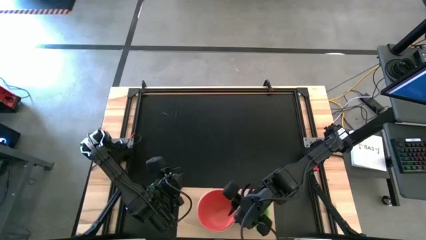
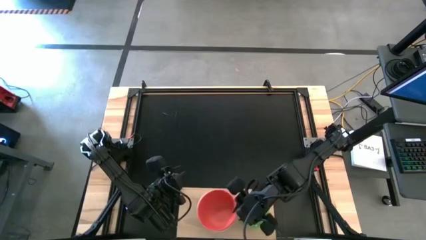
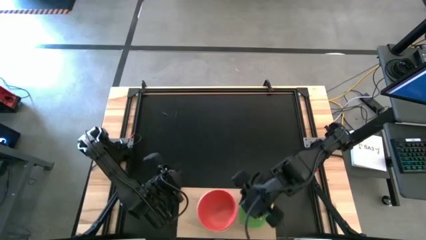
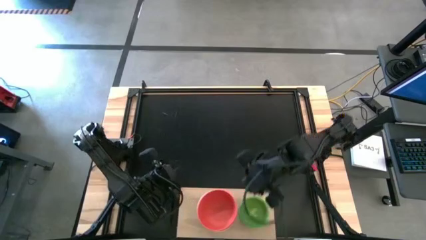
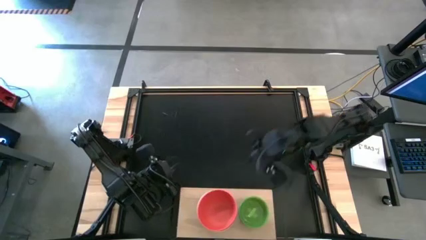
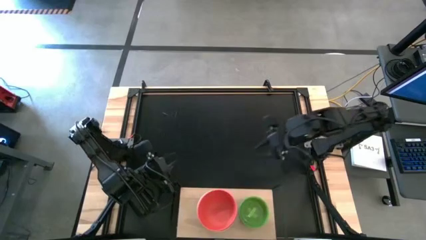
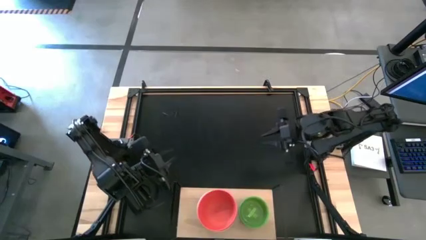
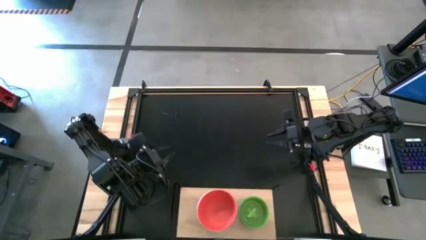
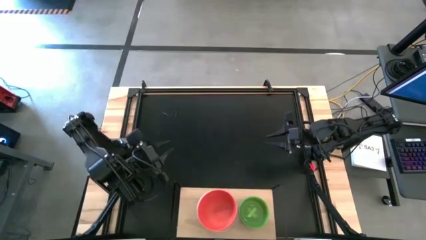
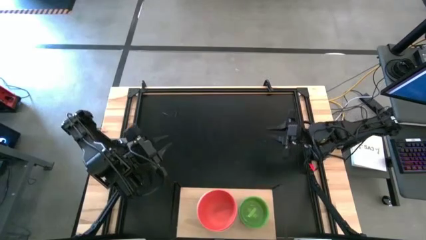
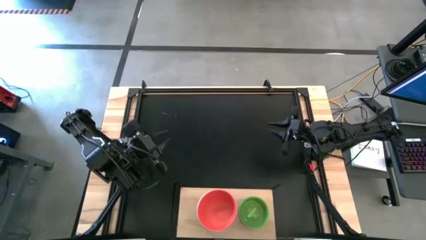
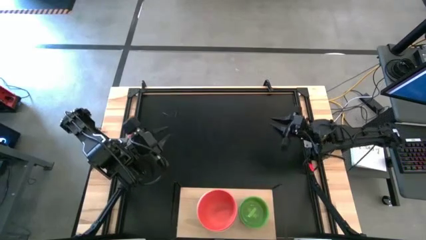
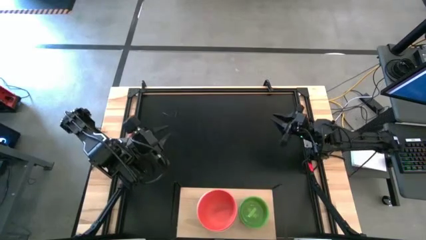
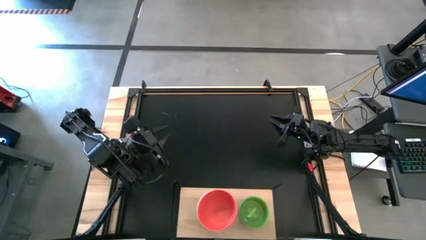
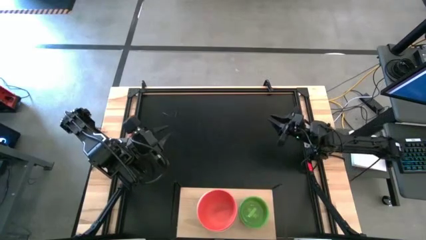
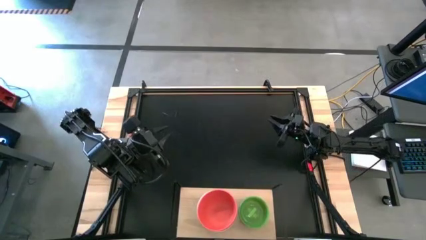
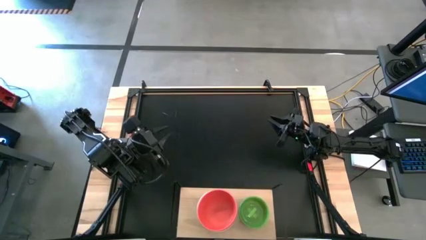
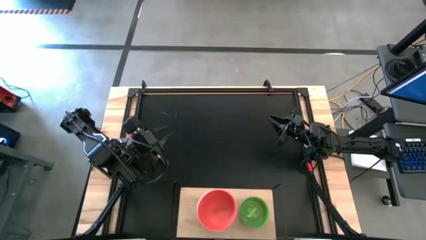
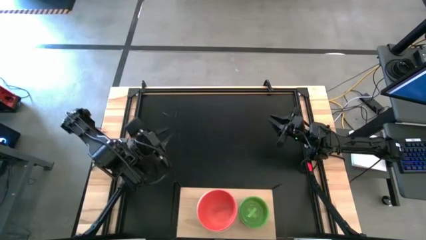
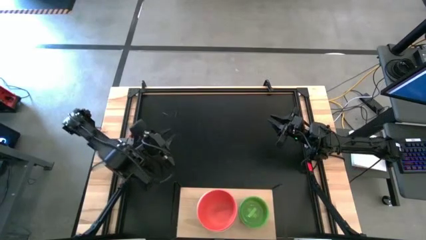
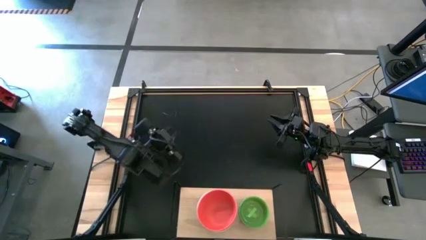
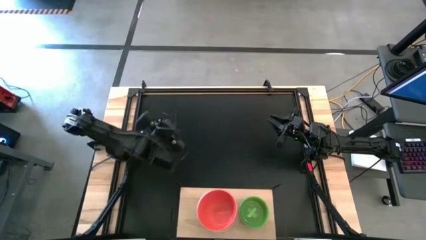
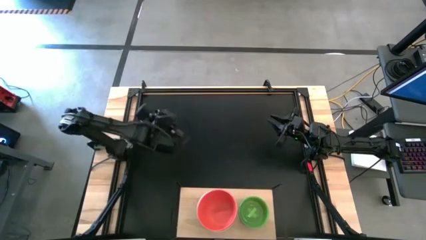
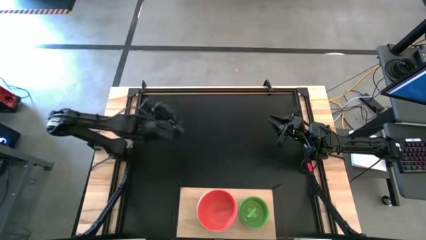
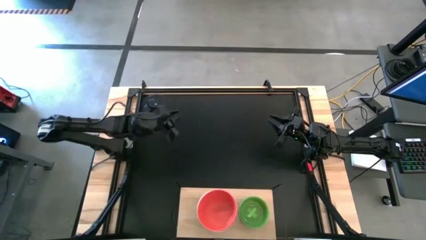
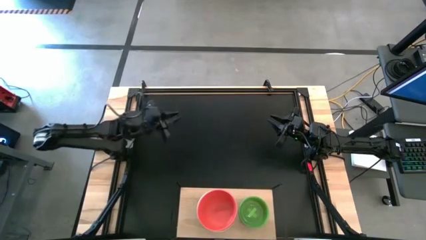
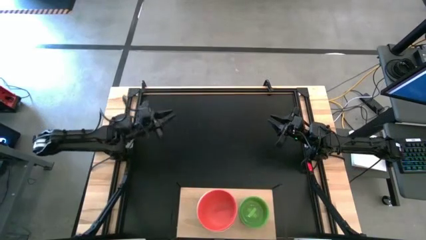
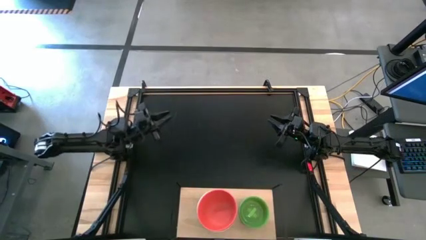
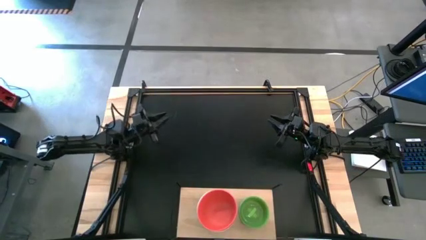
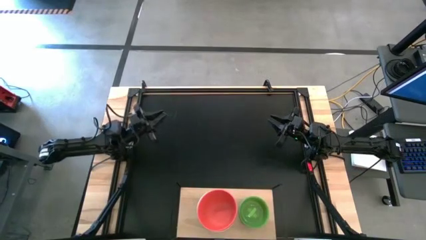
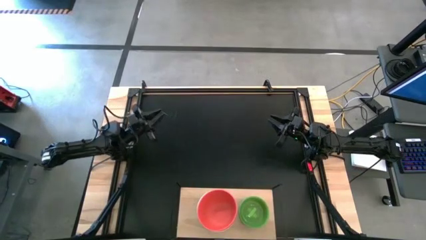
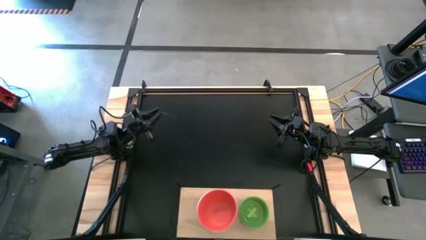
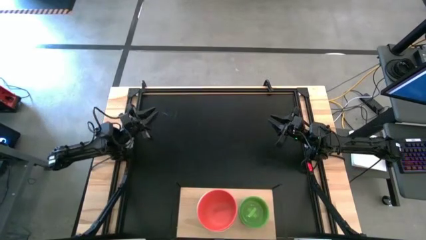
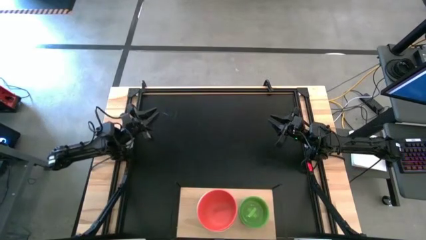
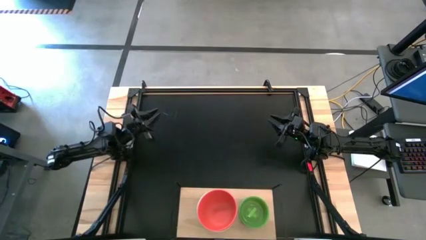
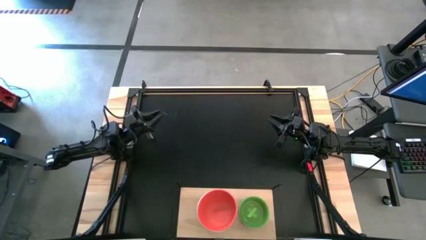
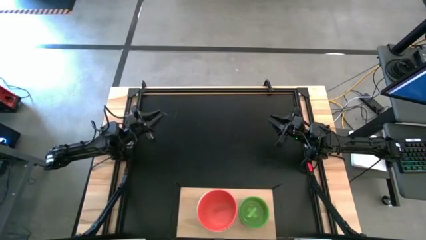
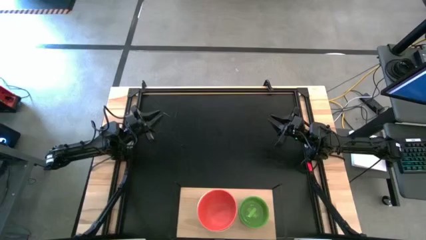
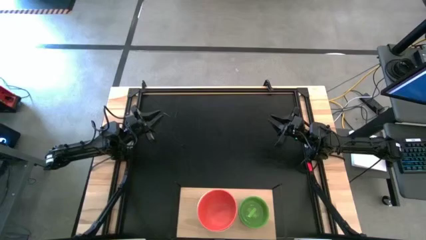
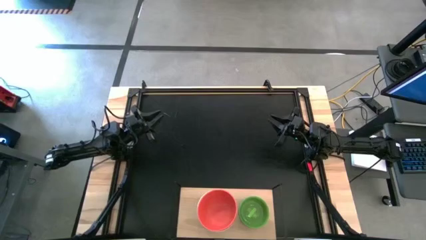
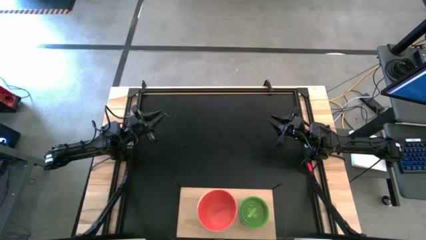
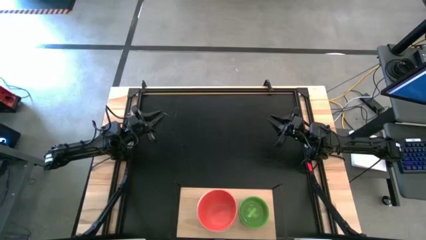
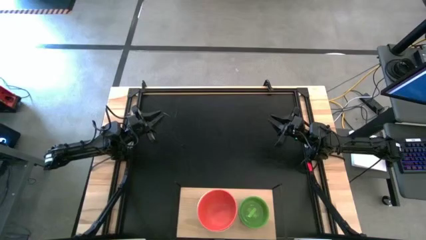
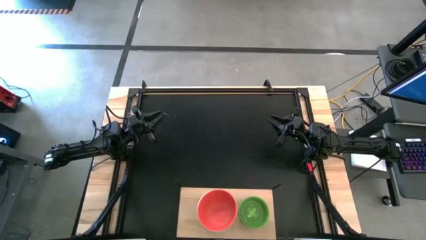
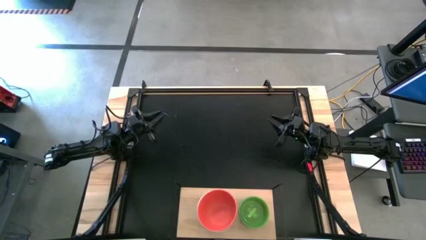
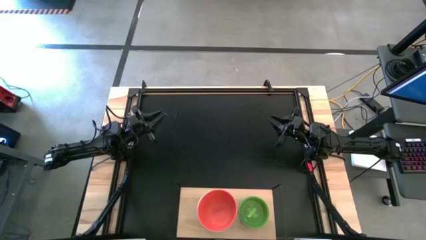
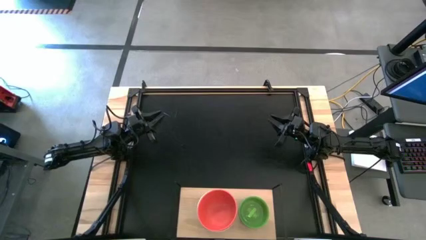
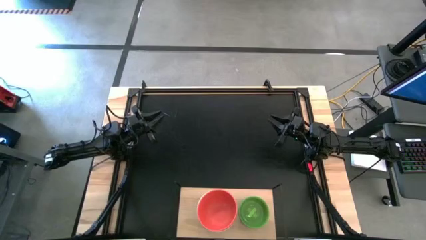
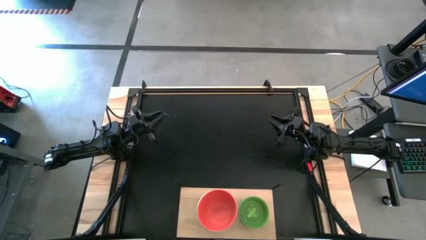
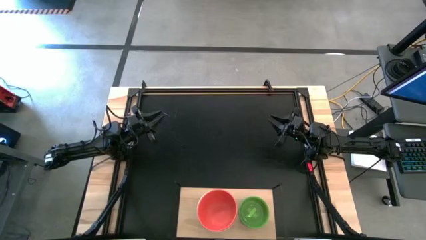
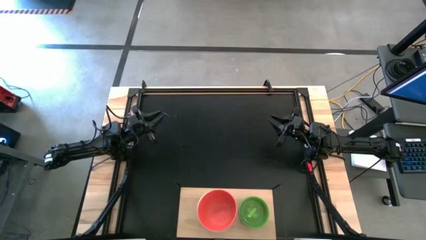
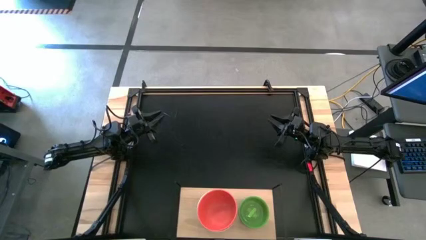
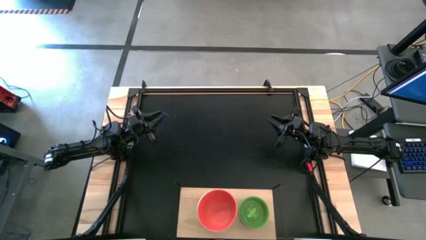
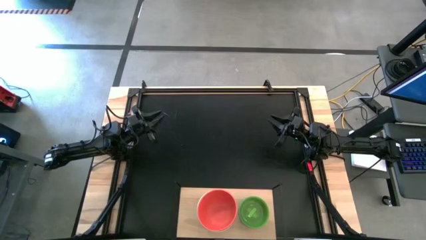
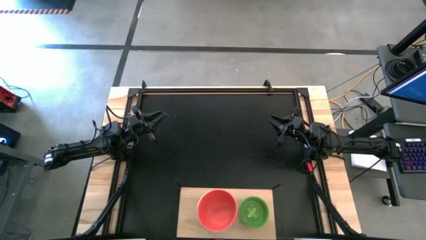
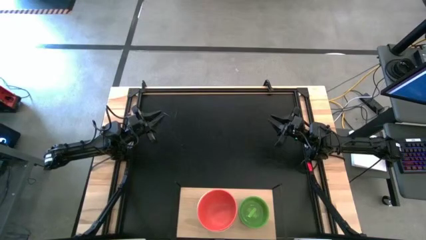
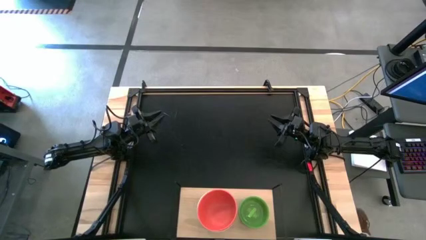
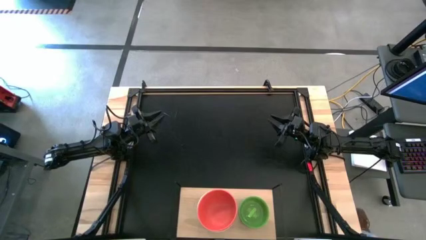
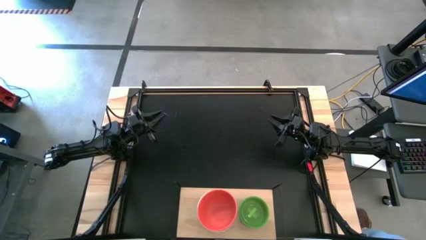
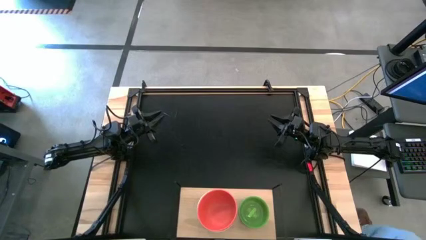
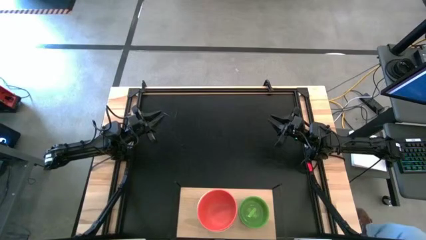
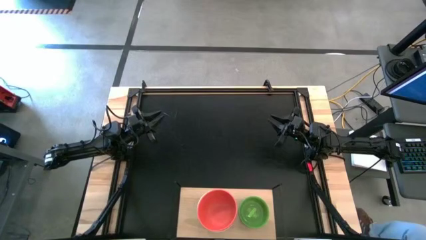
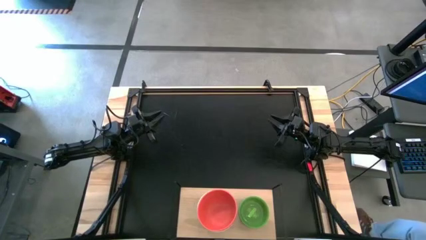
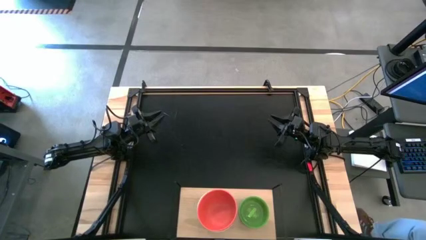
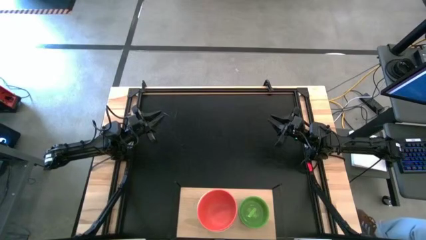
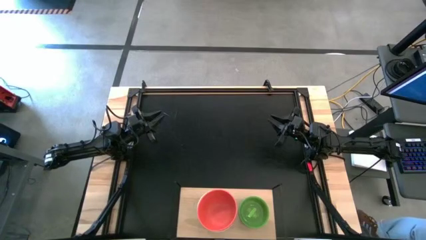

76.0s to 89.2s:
Task: Place and stack bowls onto a shelf
Return to Home Position

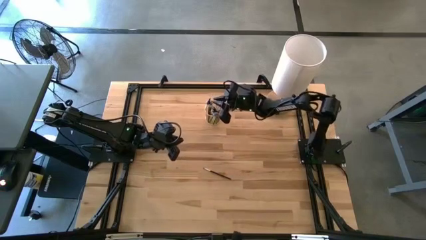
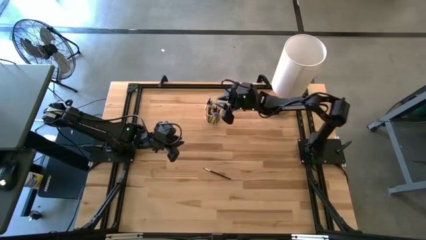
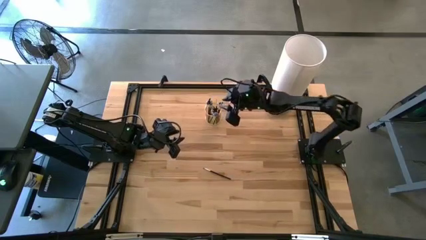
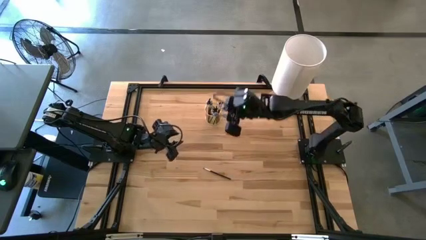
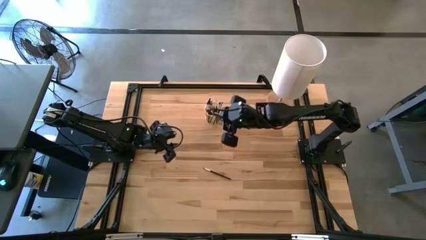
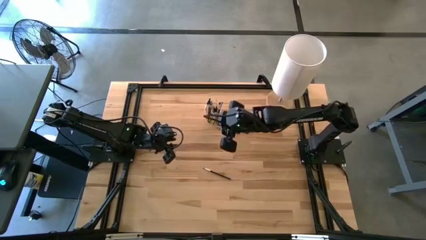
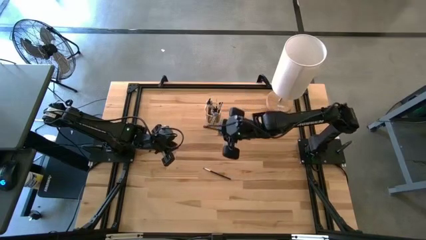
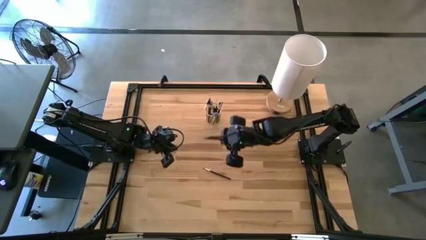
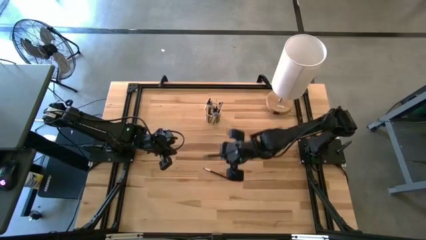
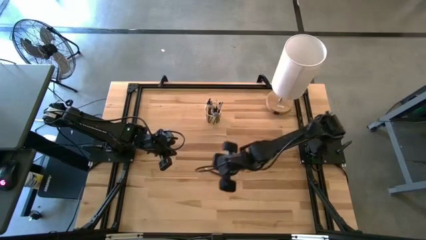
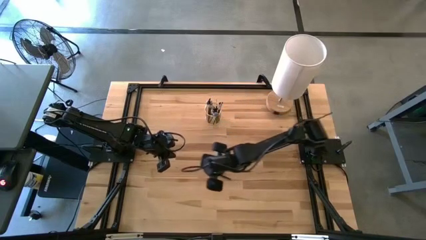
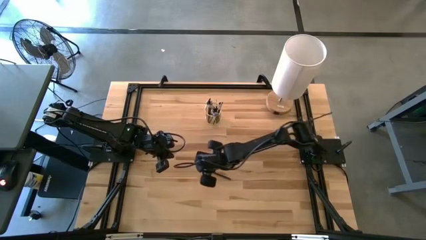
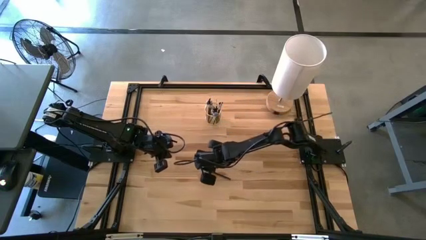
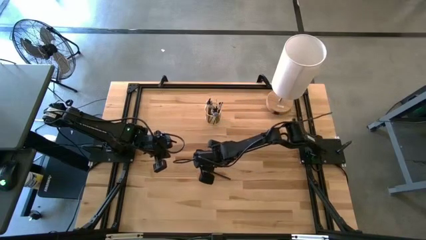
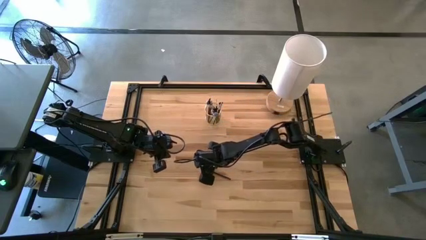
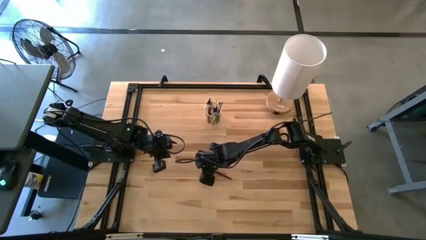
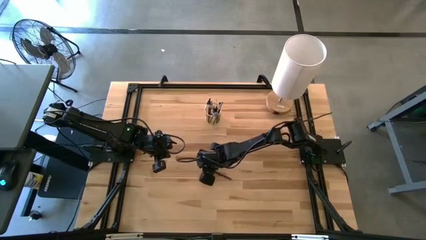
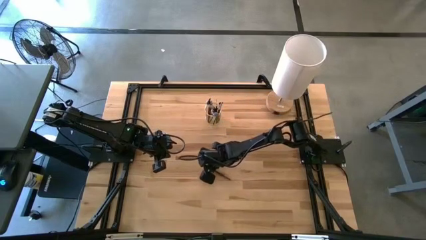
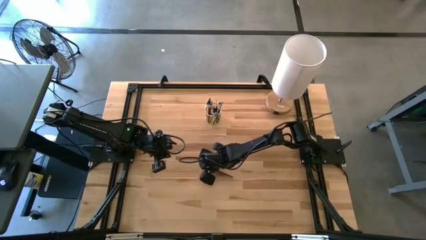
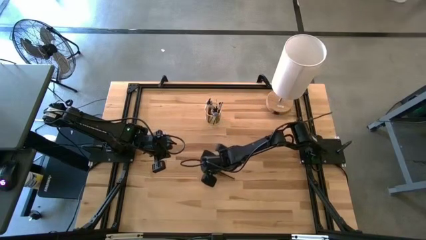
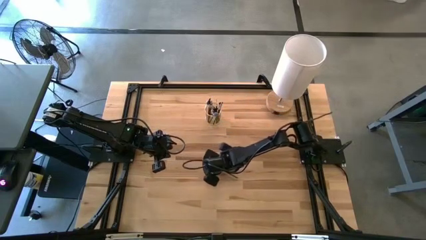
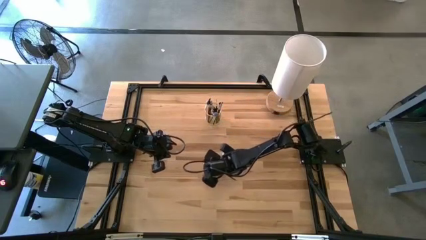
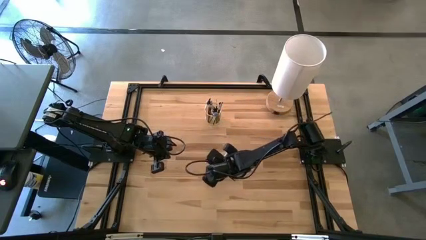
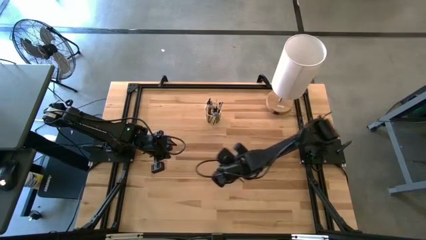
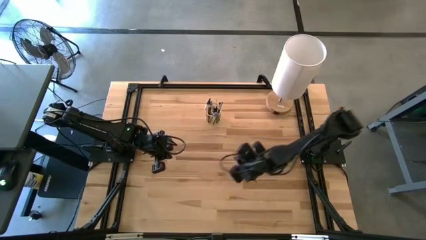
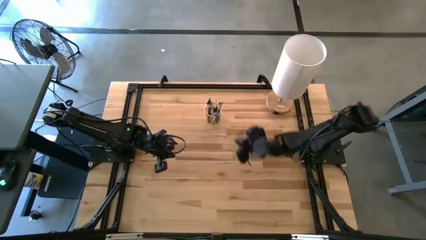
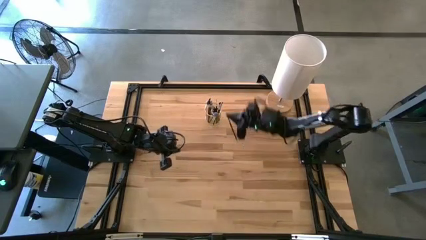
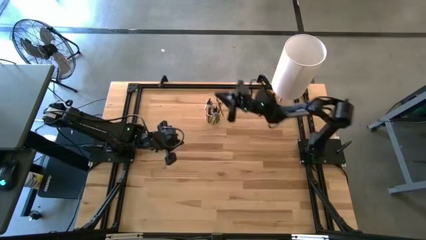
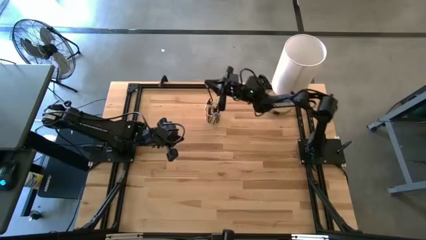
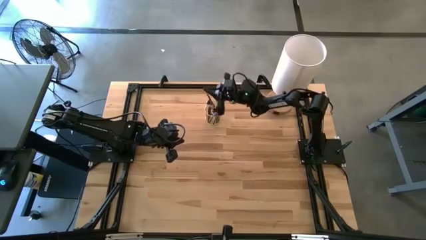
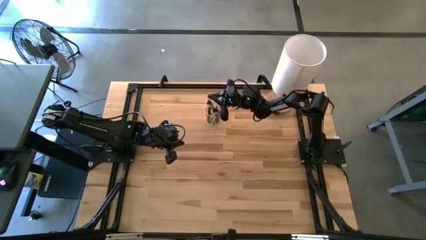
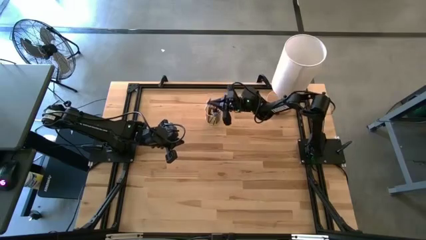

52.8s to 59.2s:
Task: Put items in baskets/containers
Put the eyeshadow brush into the pen holder
